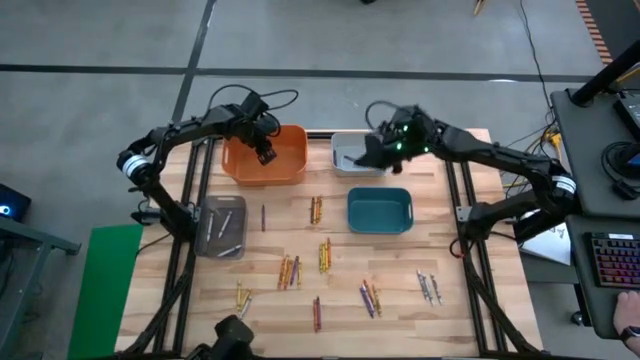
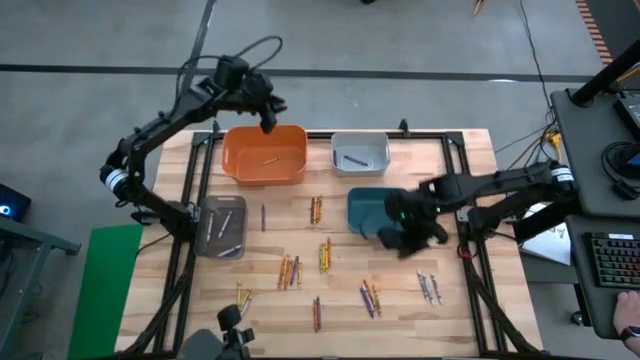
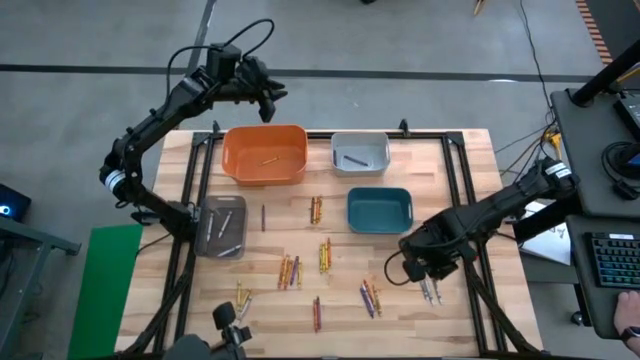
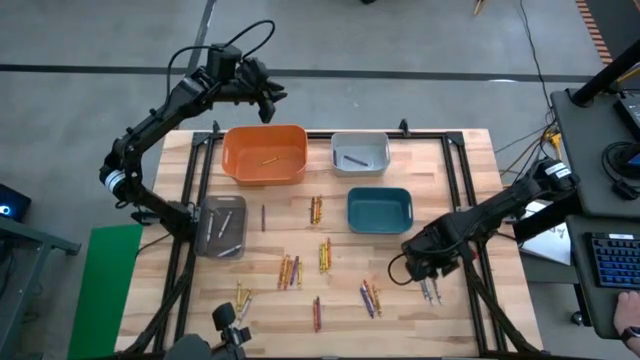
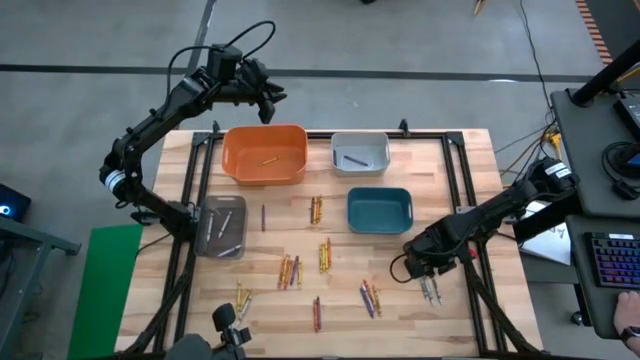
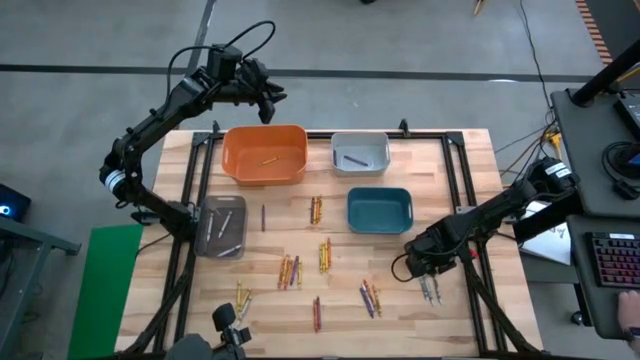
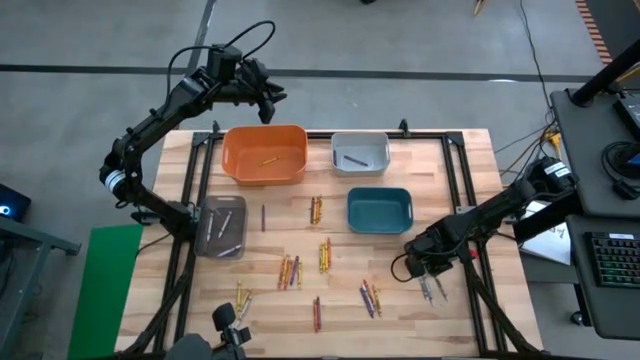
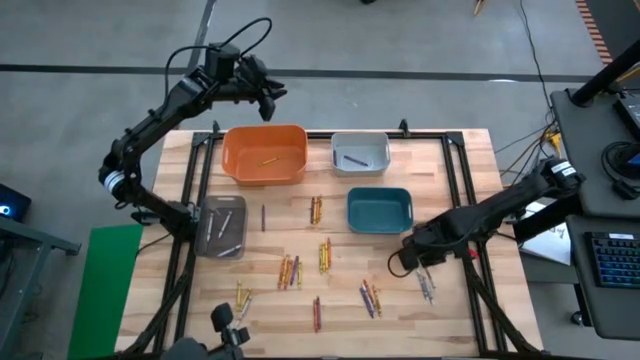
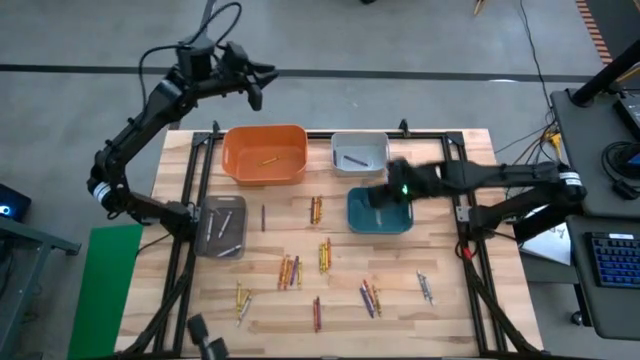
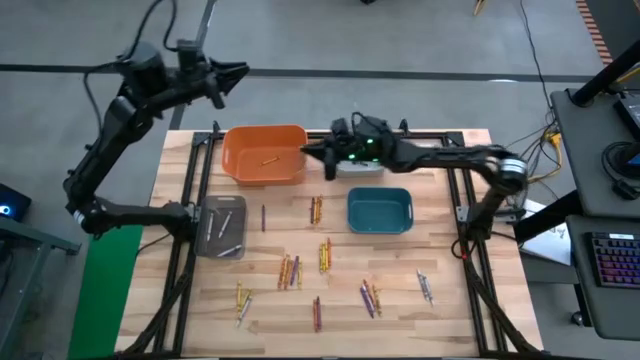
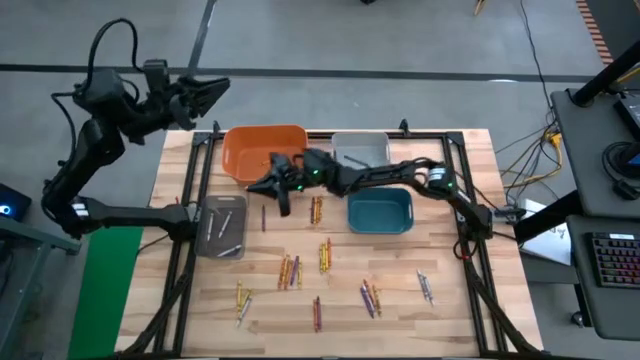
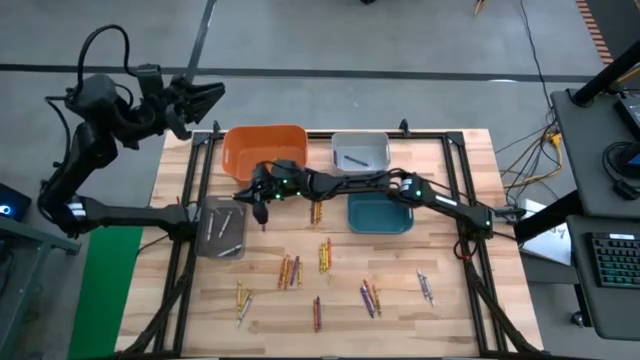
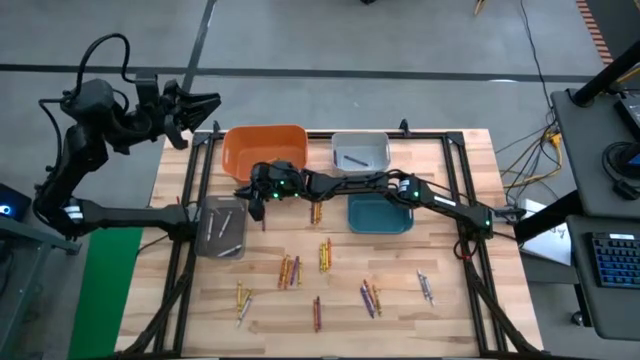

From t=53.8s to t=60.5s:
Task: Sort crayons
Put the white crayon into the black bin

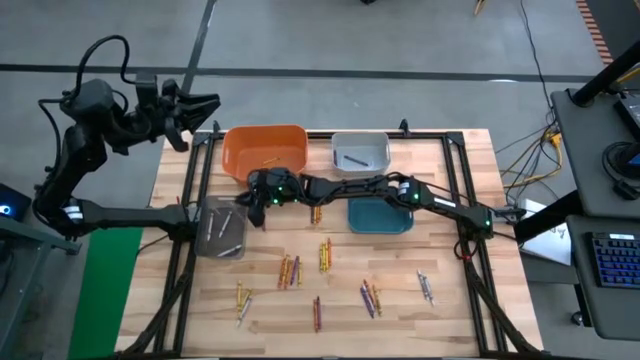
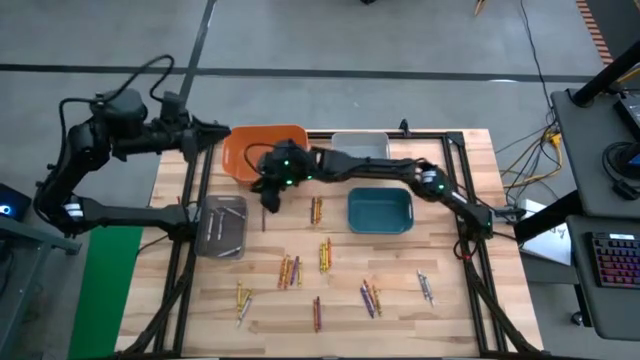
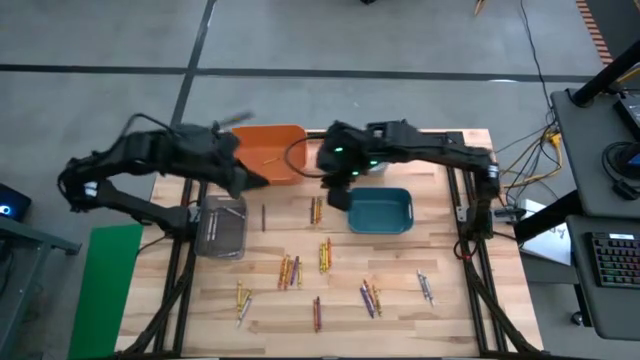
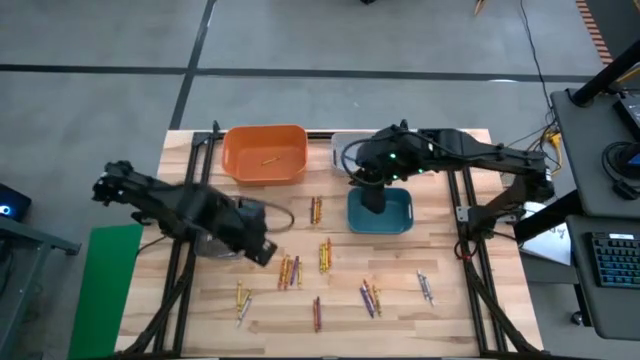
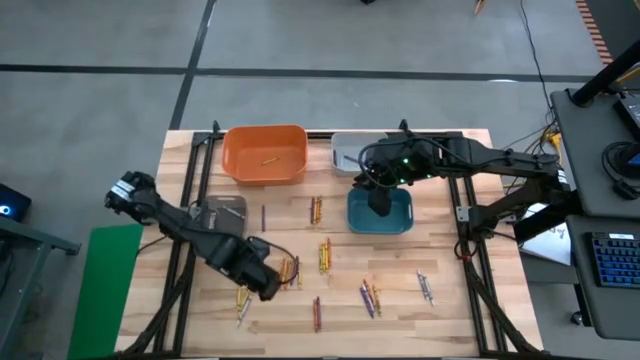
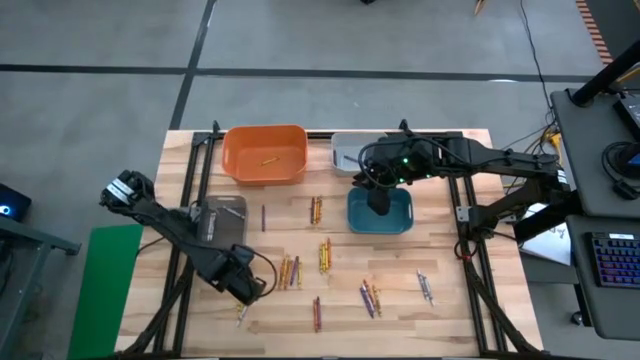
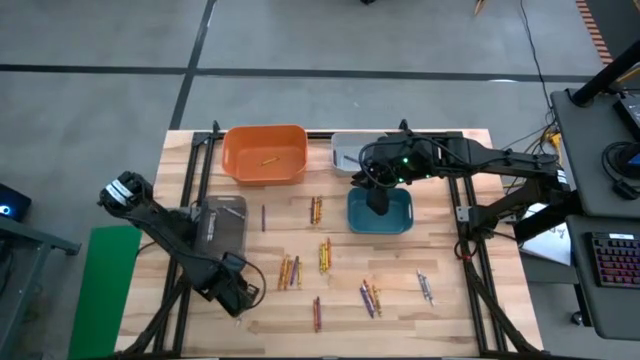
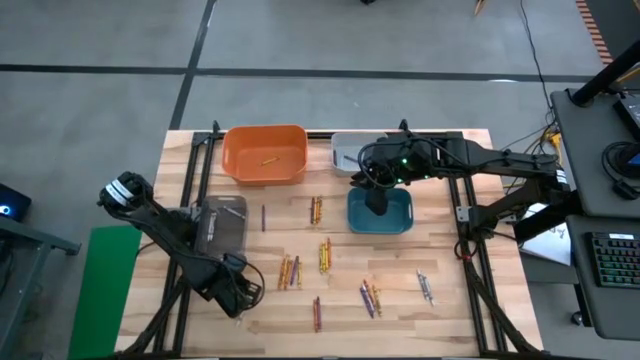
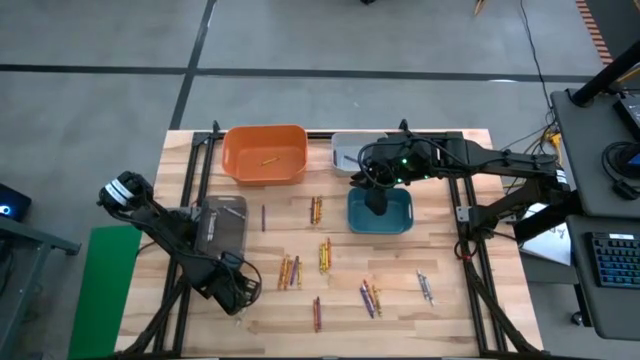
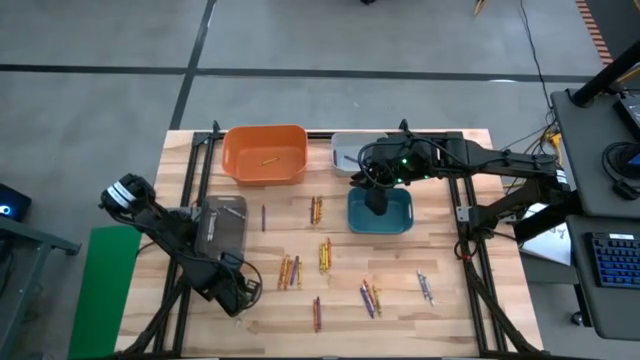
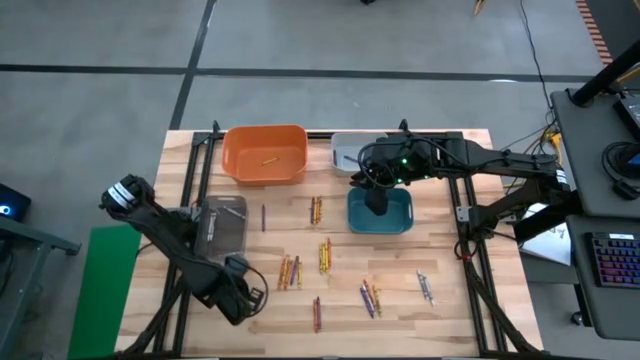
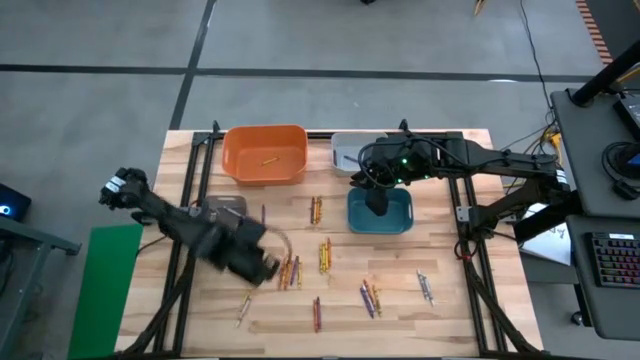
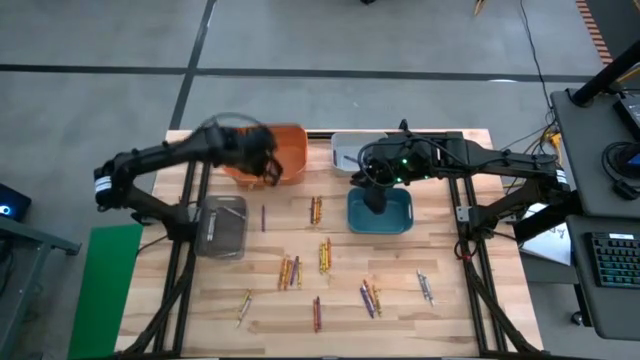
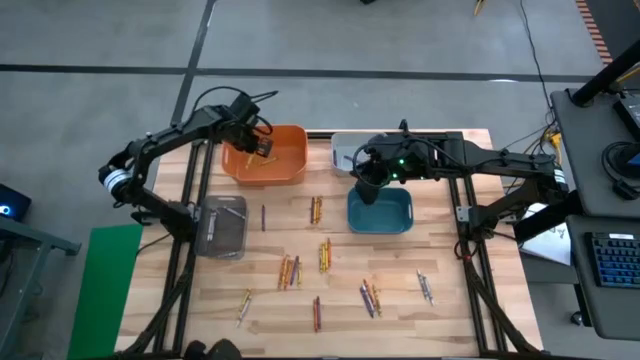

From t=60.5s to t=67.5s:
Put the yellow crayon into the orange bin

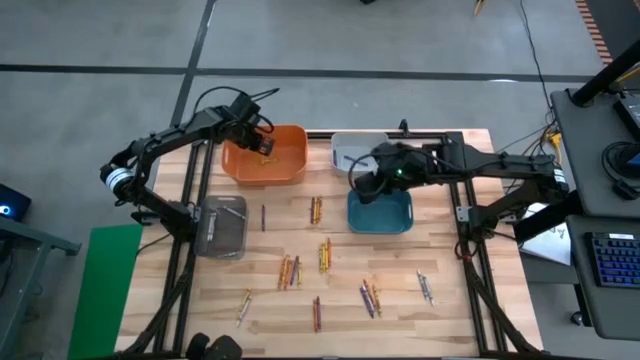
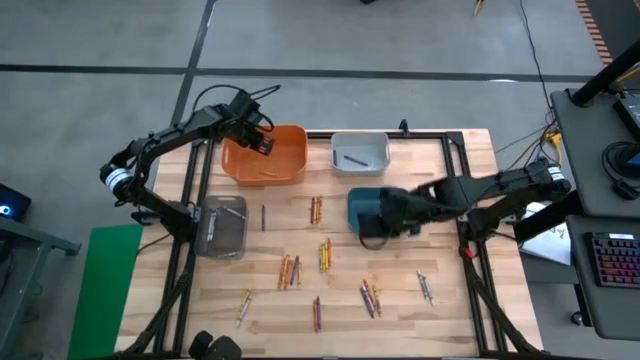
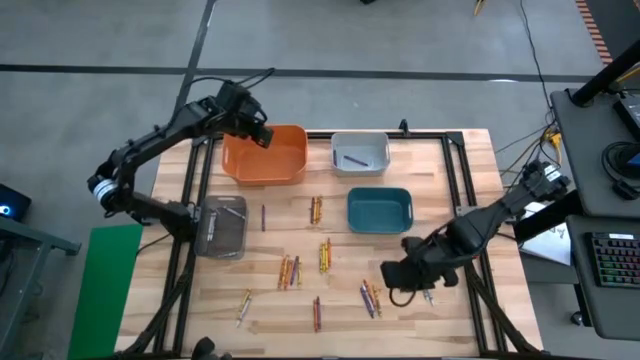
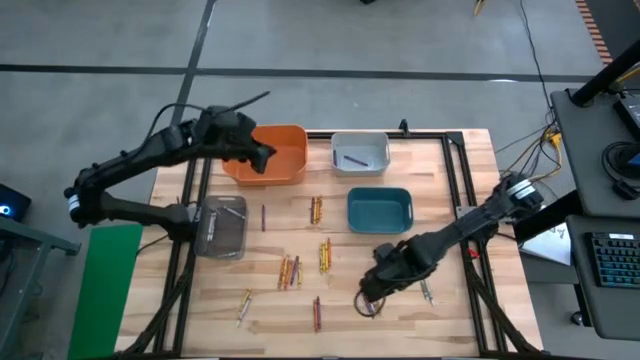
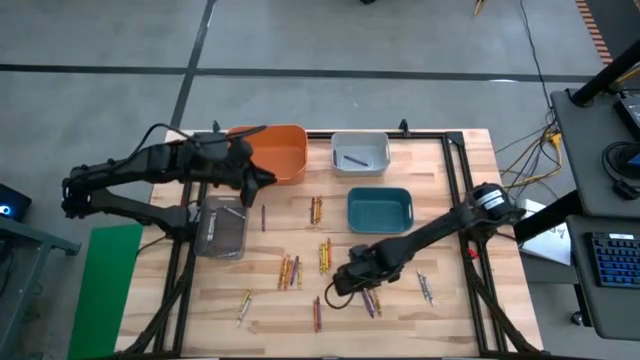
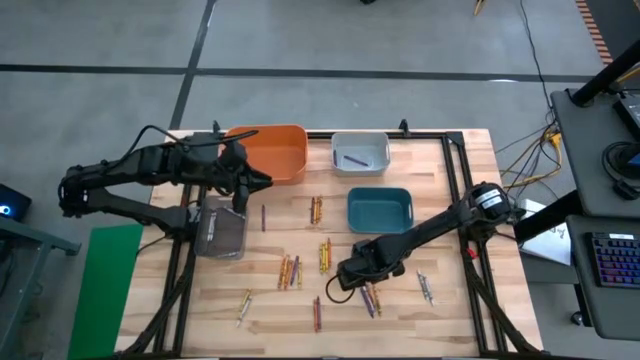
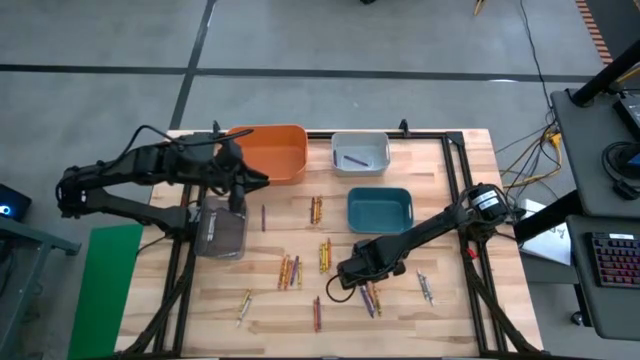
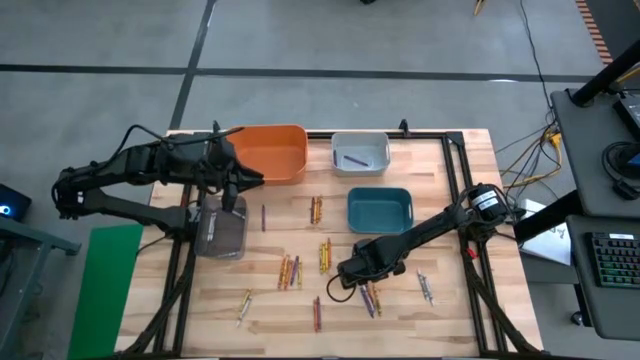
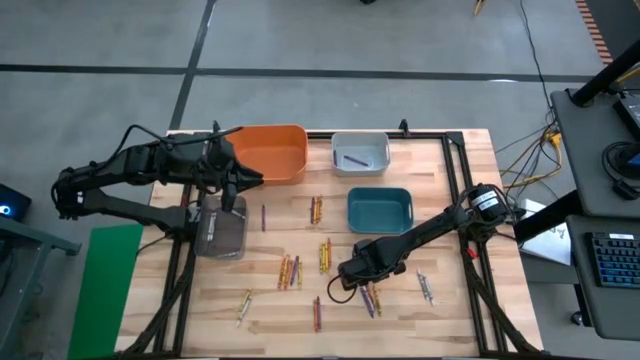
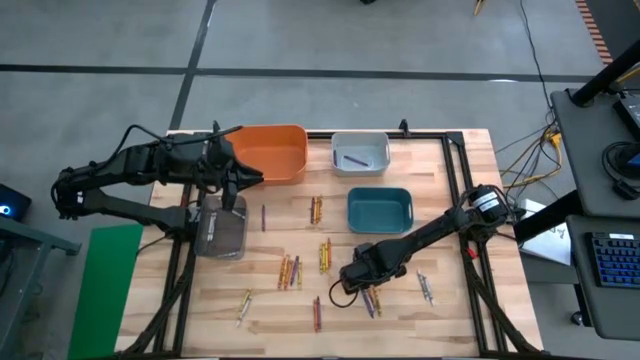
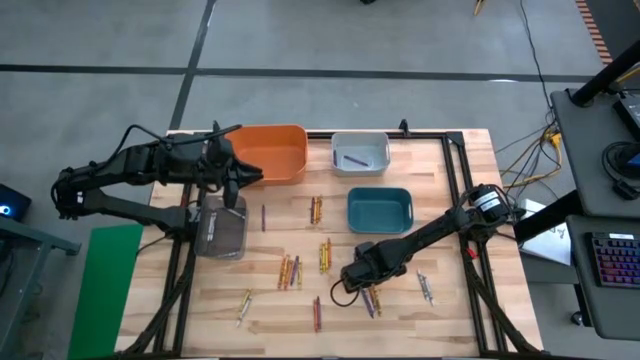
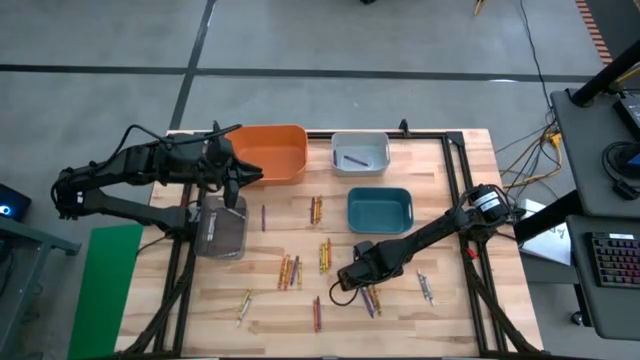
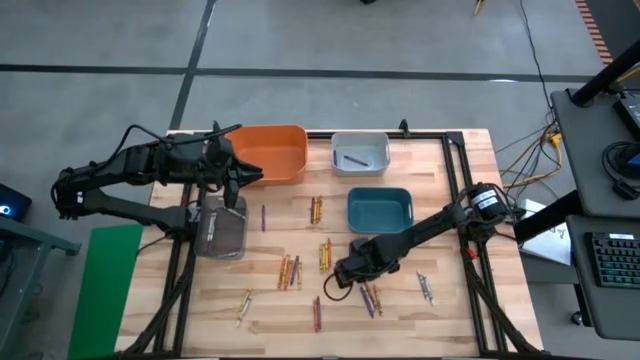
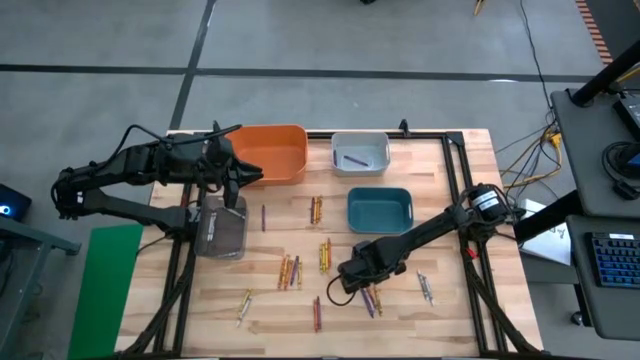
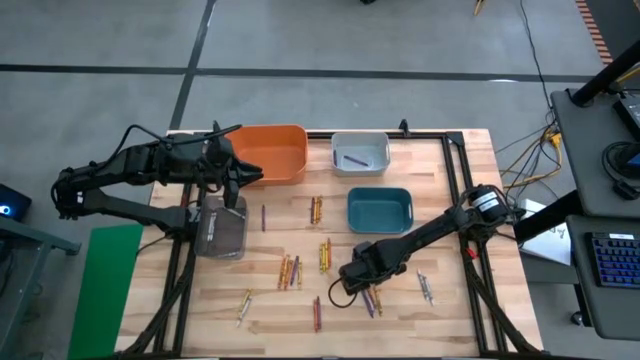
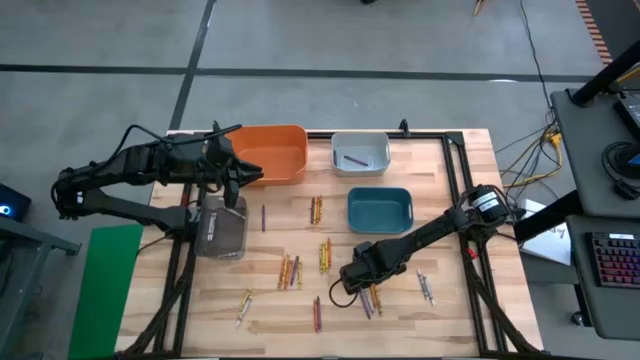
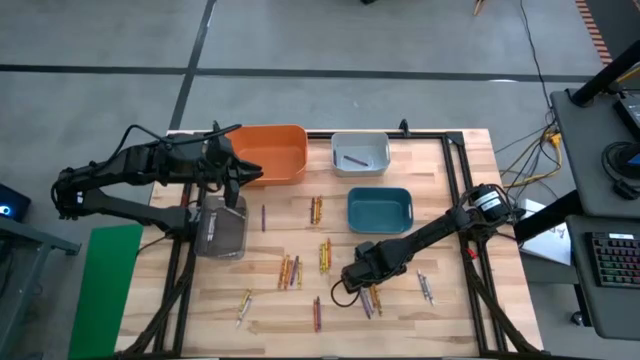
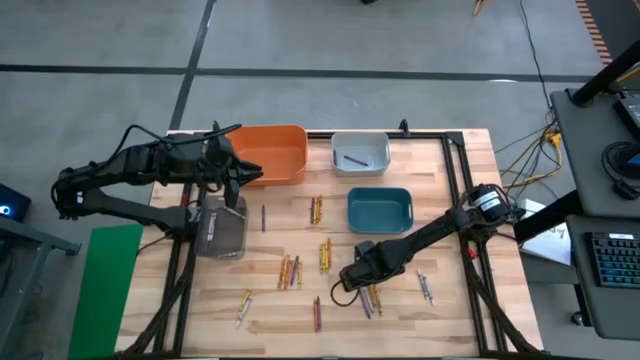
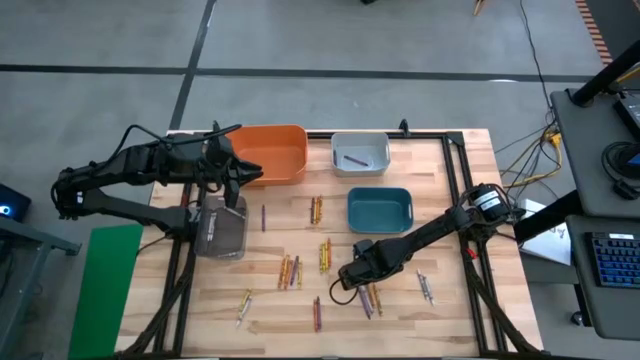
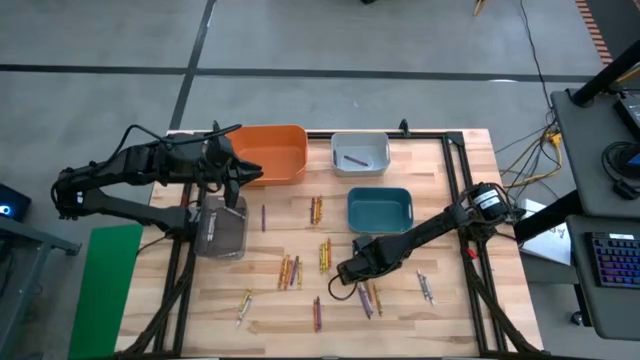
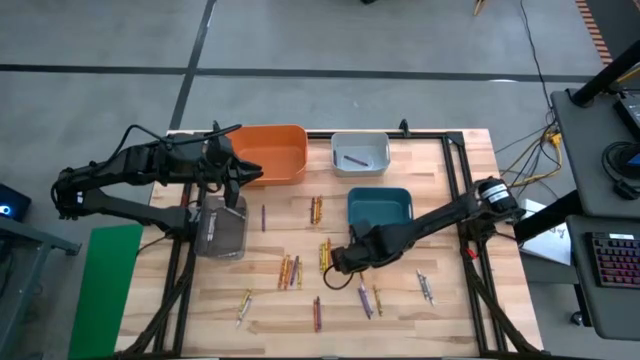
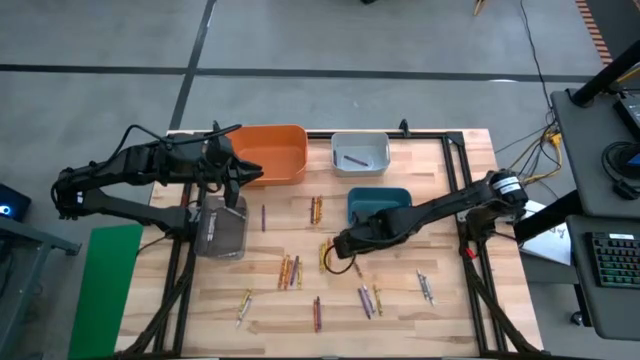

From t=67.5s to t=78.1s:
Put the orange crayon into the blue bin
